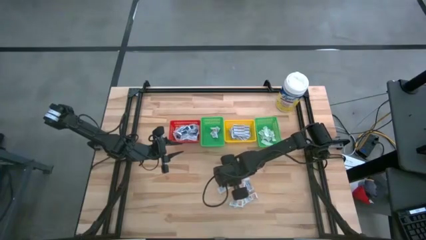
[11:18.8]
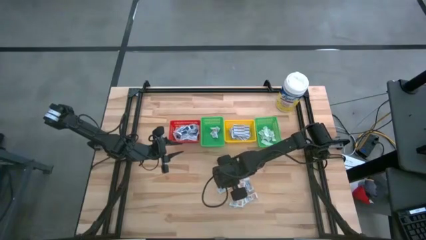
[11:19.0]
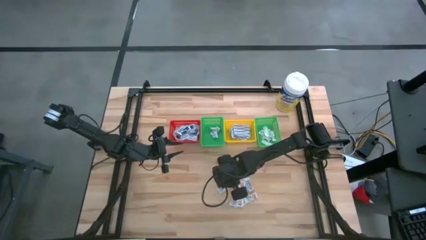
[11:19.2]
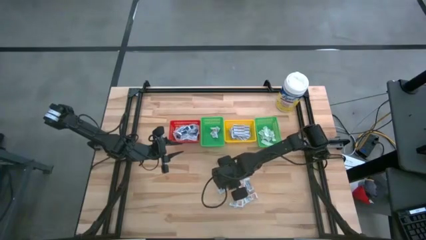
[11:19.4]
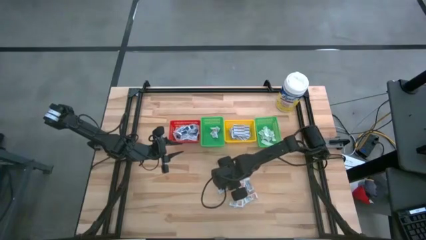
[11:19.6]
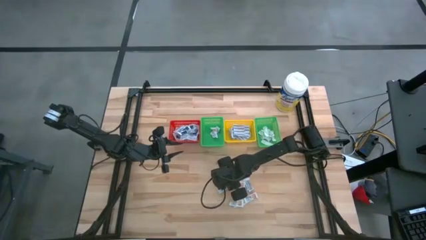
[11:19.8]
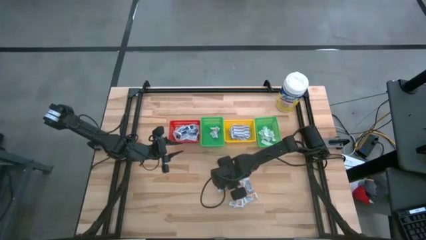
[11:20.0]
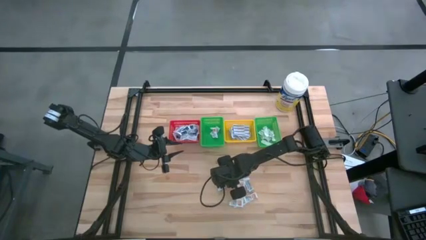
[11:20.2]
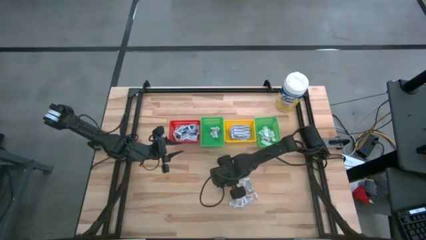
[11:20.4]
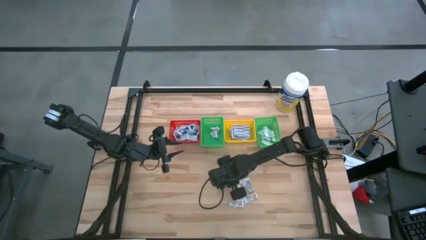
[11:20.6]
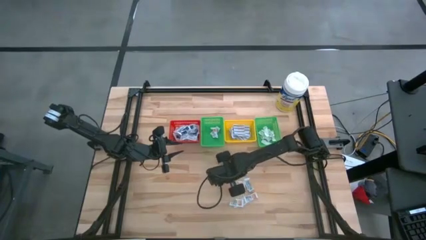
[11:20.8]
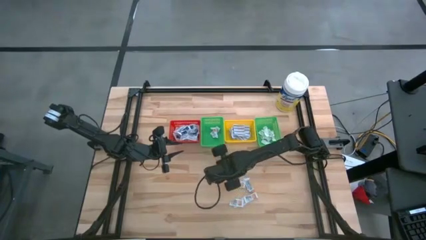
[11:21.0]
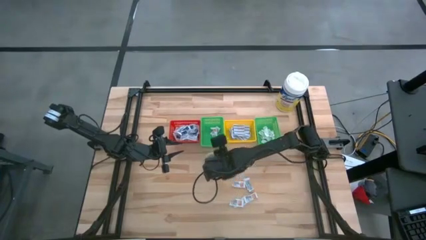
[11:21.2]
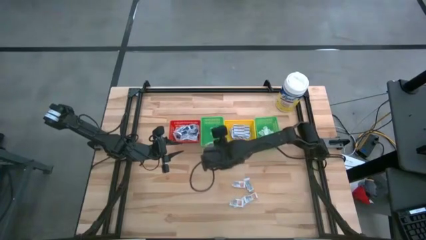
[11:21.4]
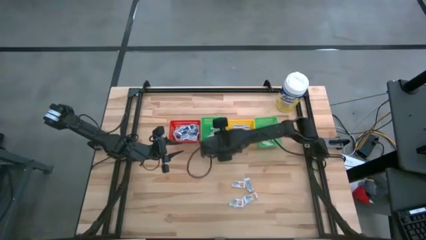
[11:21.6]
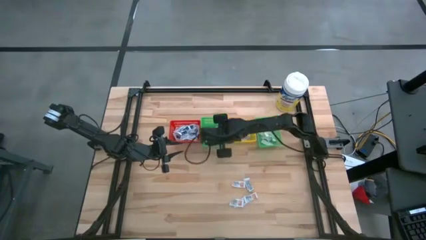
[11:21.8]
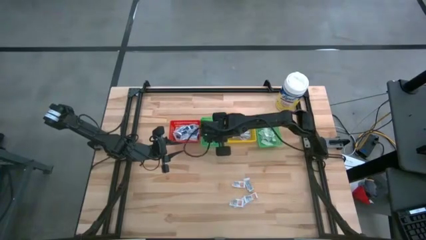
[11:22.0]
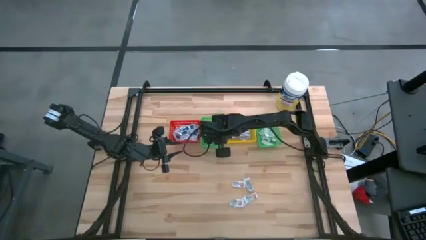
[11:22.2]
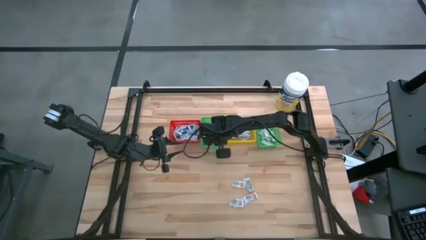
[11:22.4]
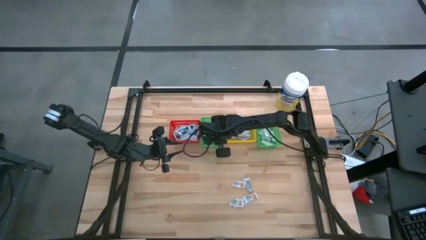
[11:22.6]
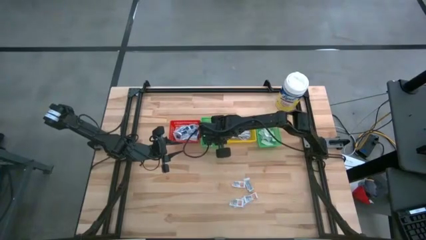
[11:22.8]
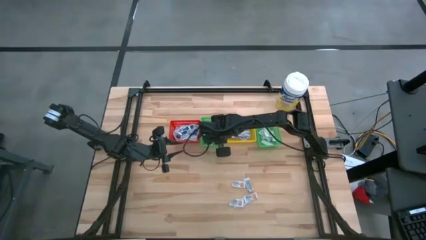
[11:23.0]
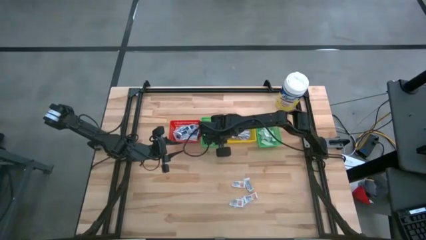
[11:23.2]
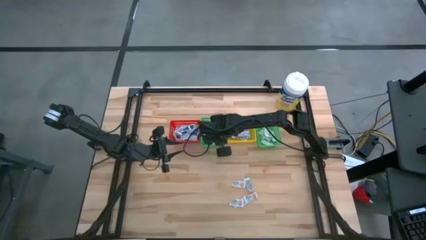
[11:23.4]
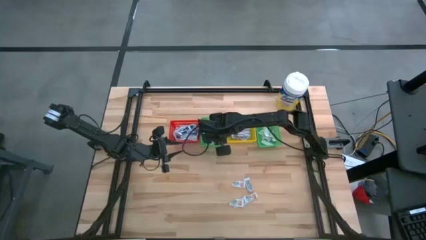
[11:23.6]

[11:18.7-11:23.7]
Task: Pick & Place First Aid Supplies
Put the ointment pack into the left green basket

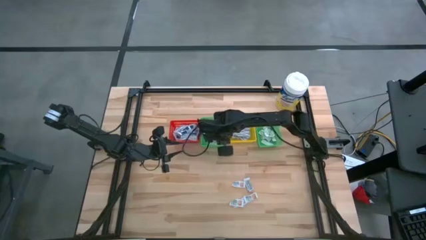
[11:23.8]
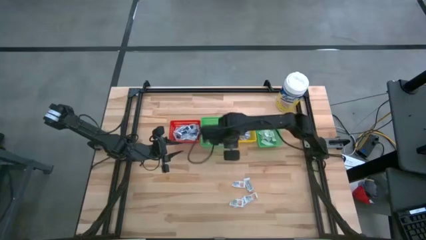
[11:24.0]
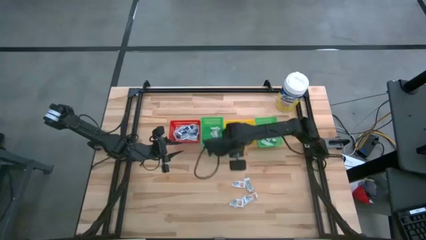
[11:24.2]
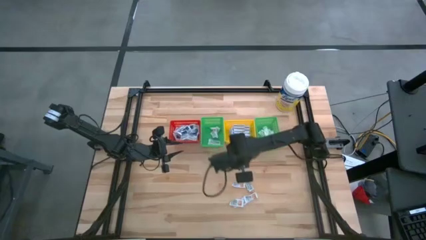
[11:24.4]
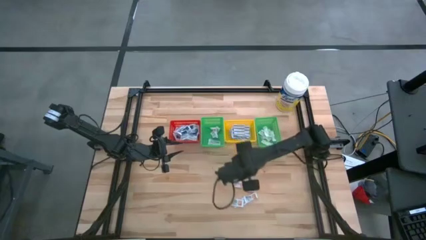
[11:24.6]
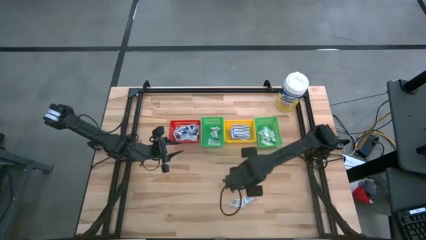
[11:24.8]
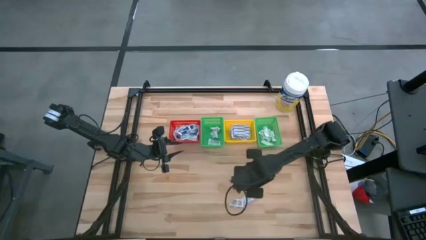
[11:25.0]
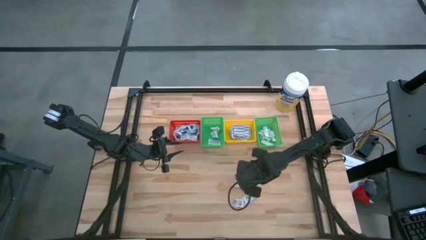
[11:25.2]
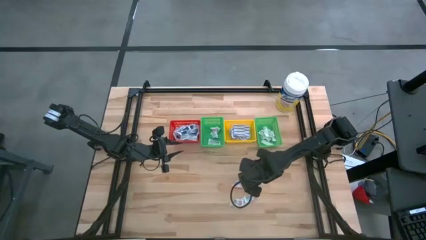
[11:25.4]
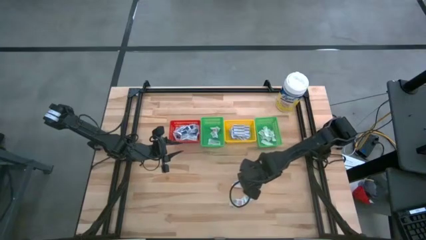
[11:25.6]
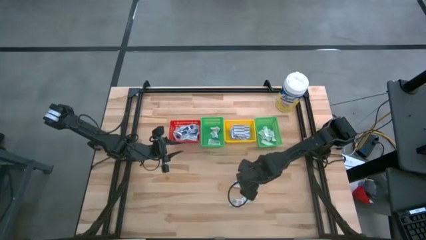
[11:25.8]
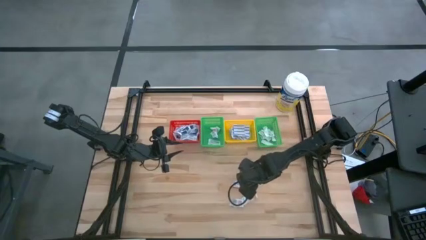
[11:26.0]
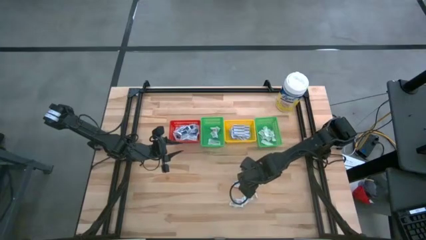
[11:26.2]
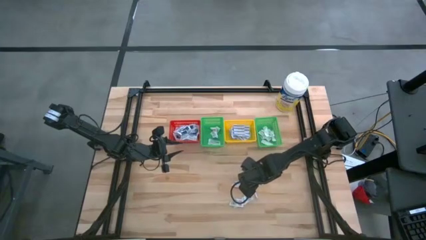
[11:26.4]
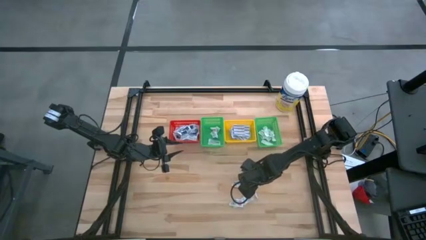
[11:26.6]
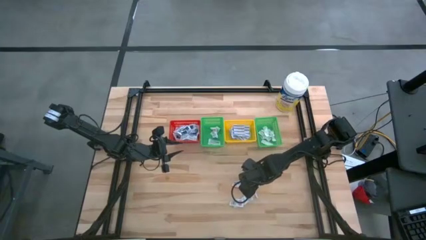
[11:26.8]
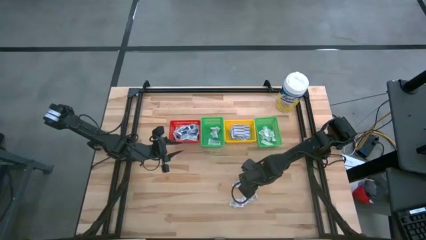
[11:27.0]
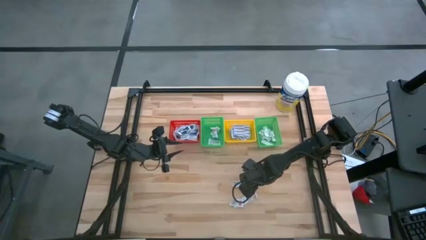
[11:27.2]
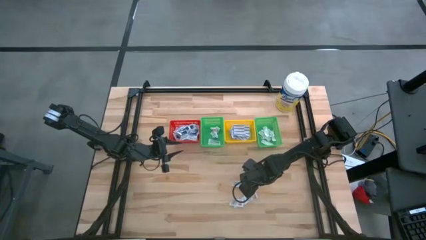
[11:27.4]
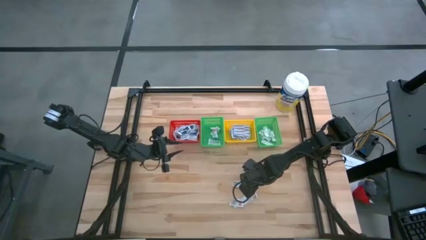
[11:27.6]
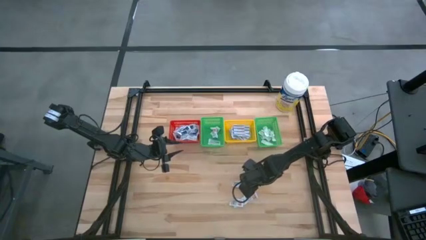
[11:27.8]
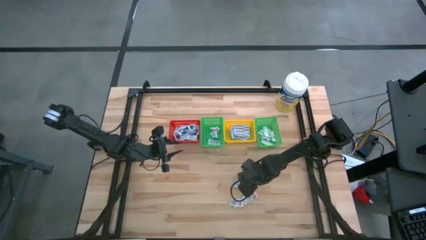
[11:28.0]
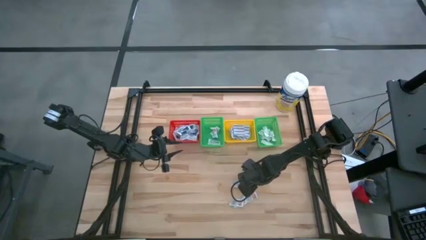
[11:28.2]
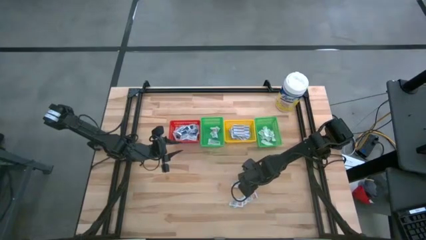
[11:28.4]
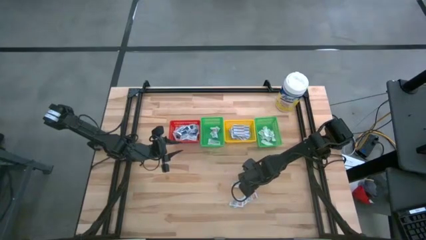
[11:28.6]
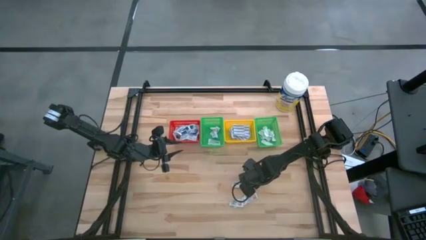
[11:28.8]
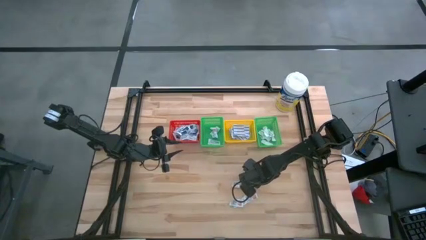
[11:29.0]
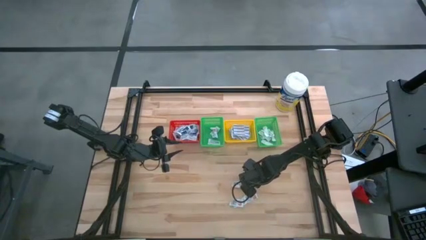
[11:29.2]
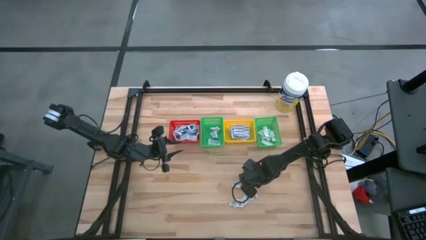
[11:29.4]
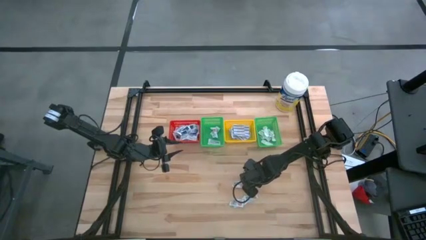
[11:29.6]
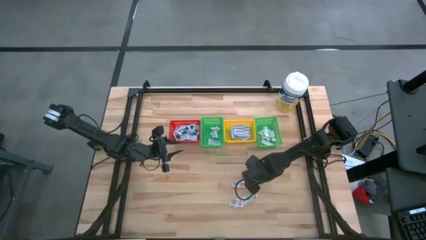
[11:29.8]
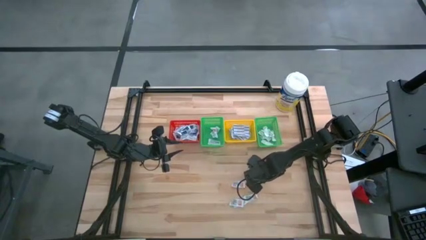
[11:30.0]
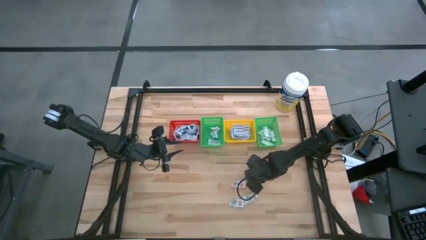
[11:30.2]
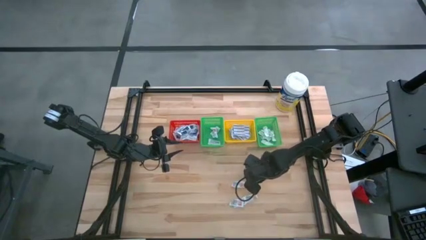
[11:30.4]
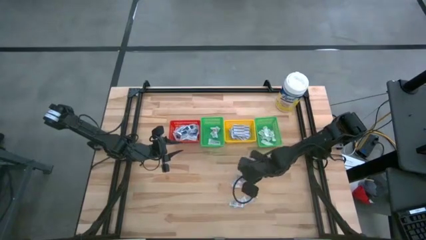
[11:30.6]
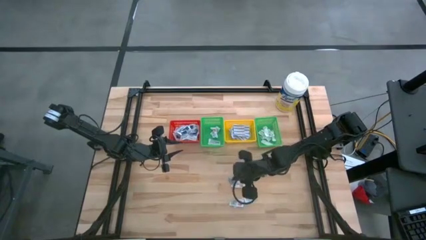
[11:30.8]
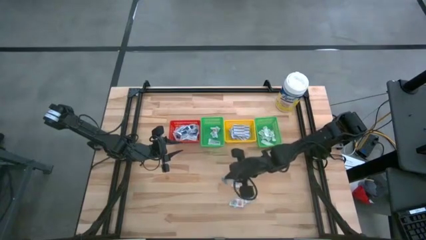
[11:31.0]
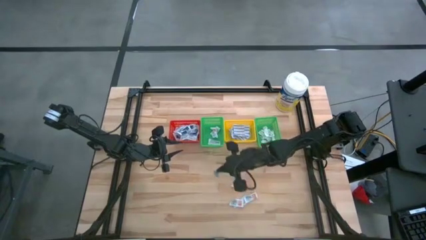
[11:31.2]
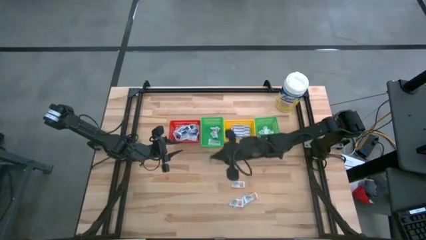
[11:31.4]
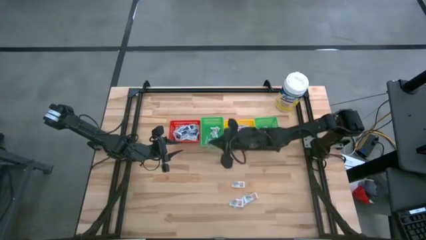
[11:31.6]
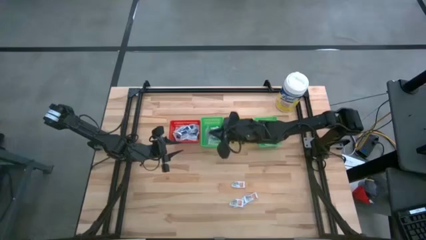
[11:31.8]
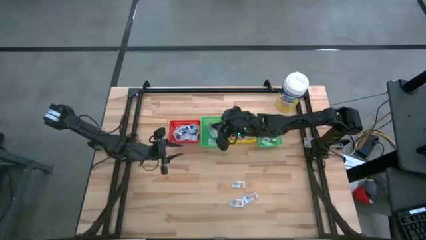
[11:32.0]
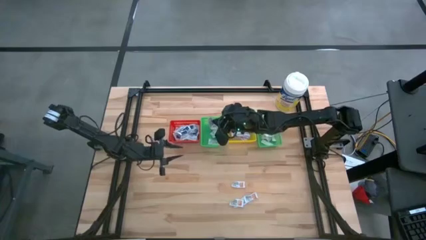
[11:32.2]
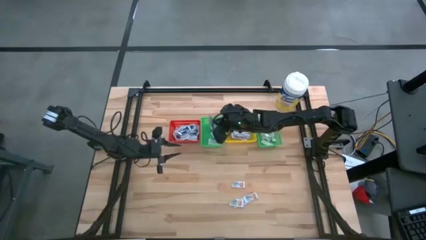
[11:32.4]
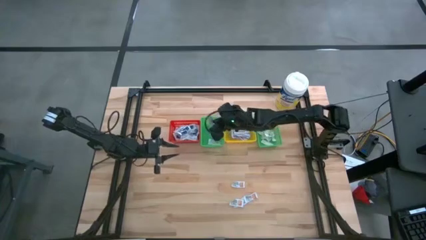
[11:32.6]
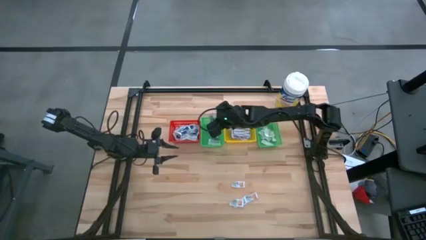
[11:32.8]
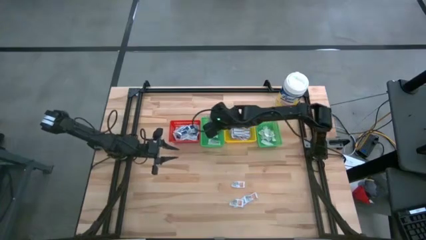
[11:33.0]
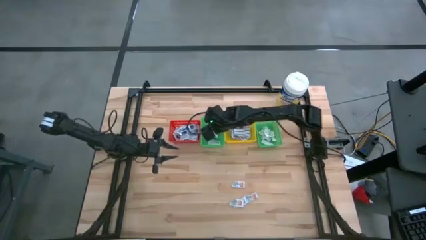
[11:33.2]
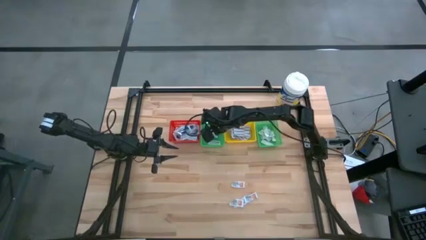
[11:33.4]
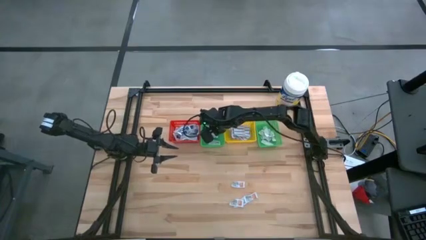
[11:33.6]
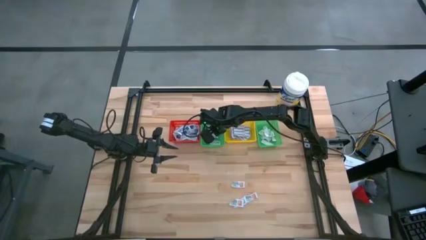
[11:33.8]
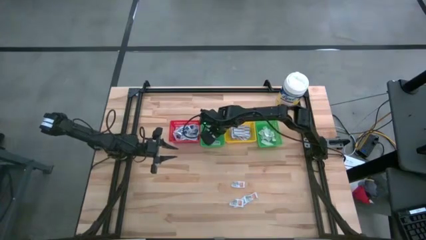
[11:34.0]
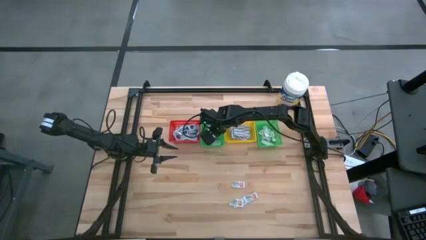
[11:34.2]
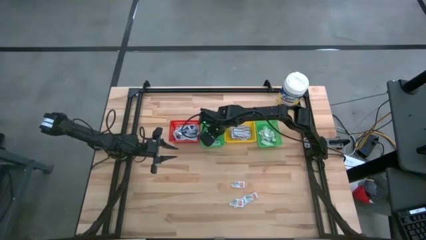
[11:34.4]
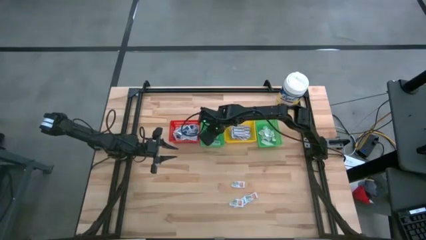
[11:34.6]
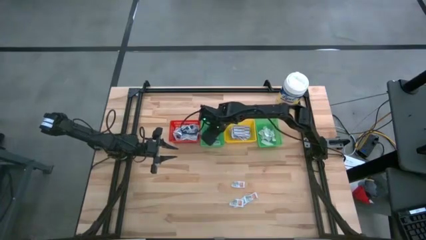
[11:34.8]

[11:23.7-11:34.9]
Put the ointment pack into the left green basket
